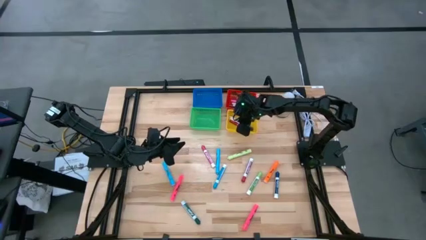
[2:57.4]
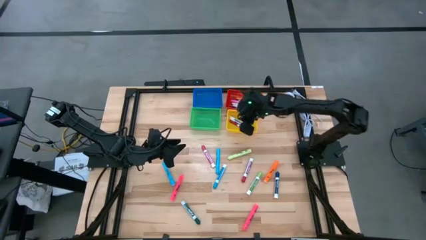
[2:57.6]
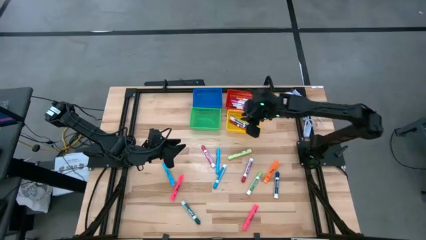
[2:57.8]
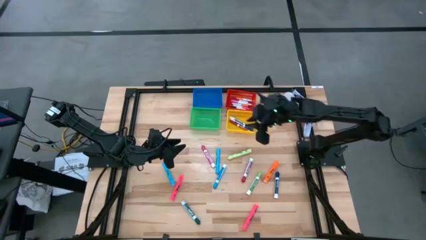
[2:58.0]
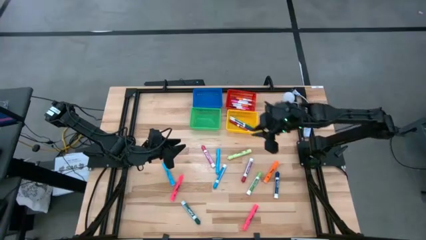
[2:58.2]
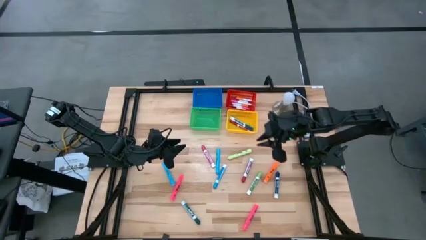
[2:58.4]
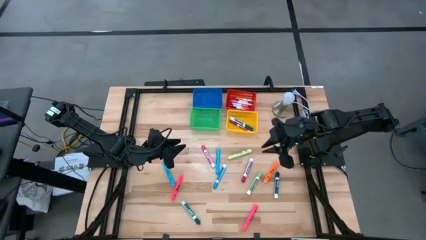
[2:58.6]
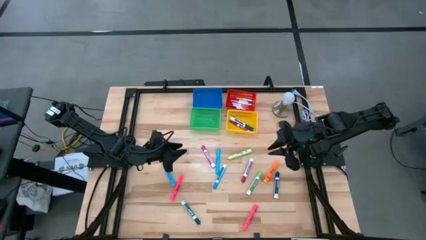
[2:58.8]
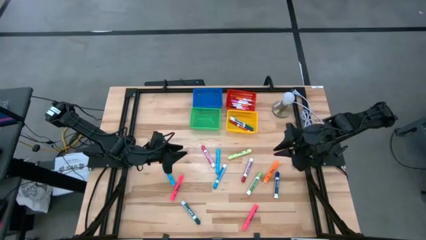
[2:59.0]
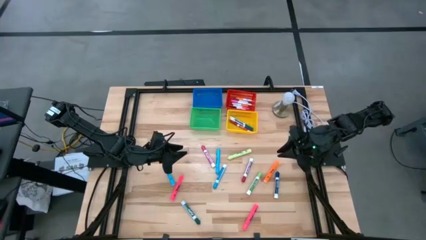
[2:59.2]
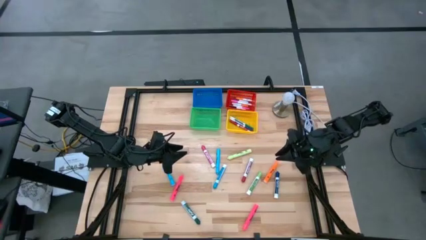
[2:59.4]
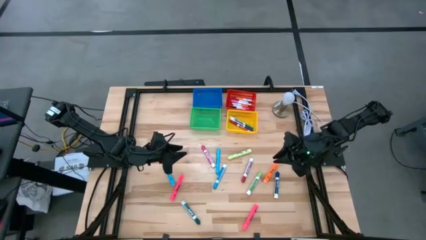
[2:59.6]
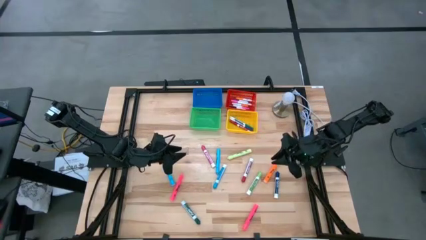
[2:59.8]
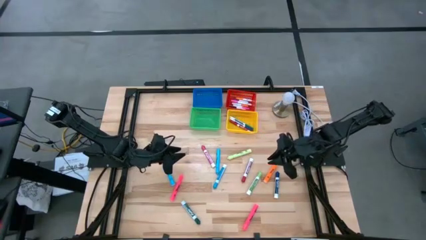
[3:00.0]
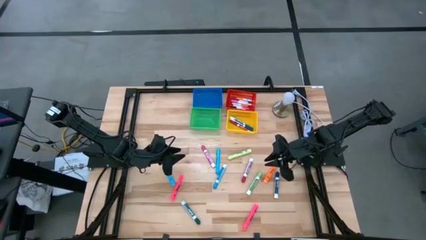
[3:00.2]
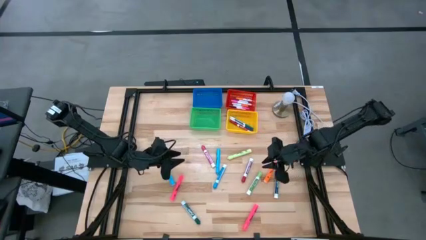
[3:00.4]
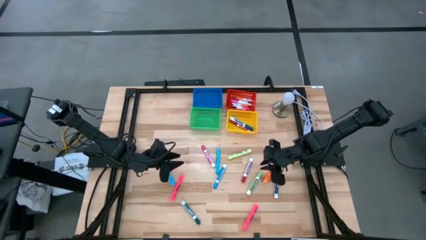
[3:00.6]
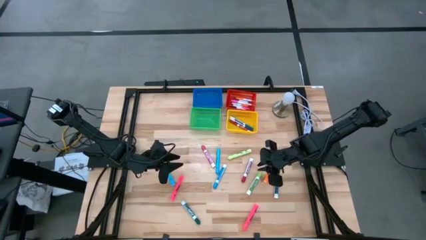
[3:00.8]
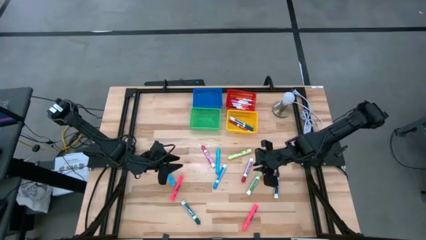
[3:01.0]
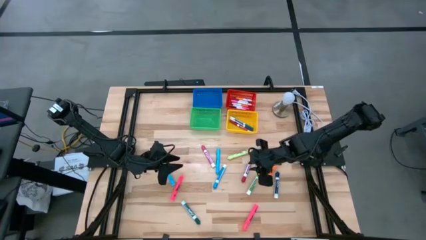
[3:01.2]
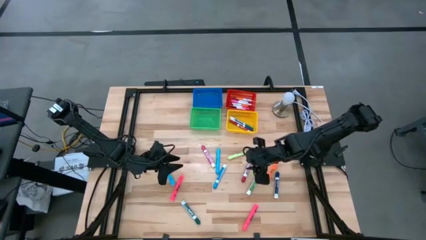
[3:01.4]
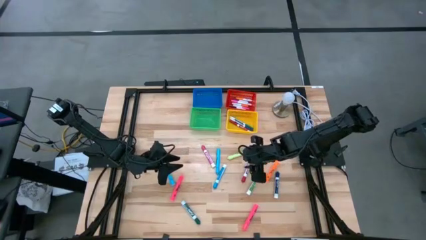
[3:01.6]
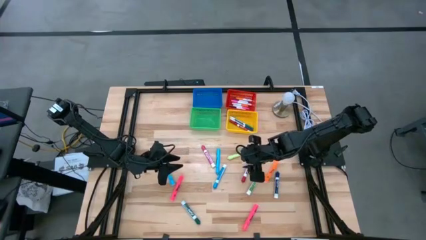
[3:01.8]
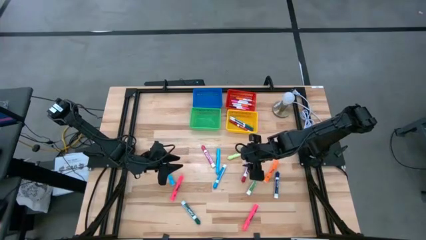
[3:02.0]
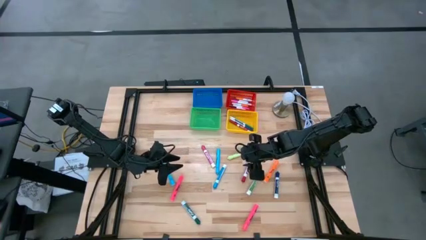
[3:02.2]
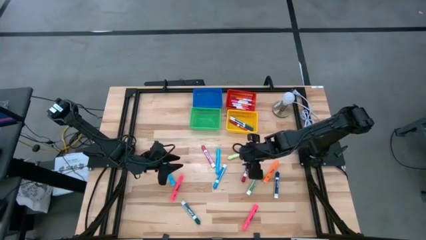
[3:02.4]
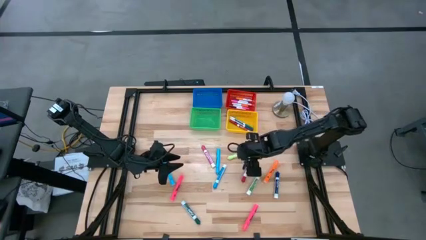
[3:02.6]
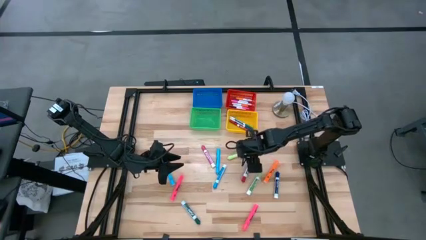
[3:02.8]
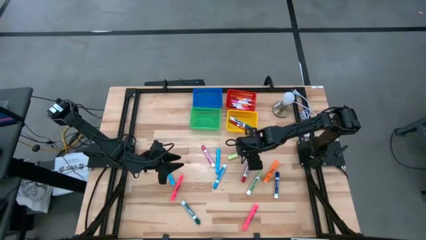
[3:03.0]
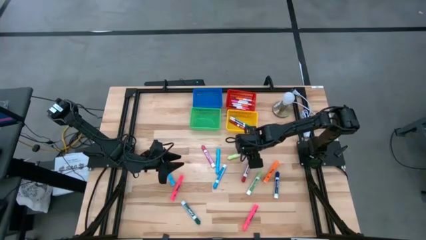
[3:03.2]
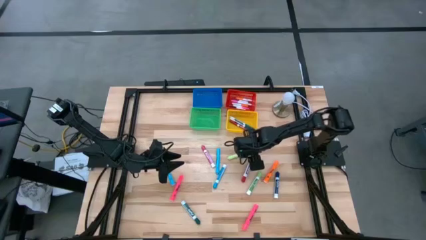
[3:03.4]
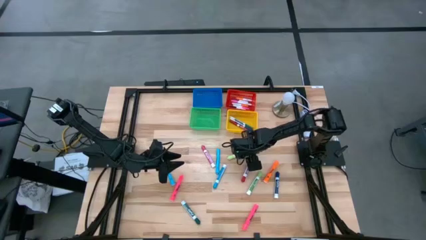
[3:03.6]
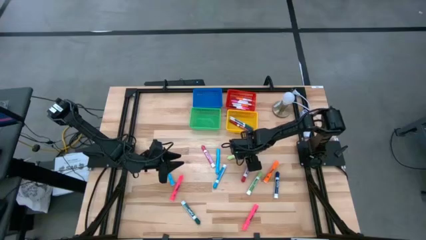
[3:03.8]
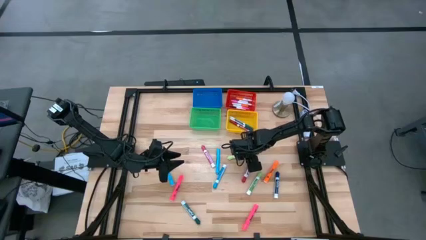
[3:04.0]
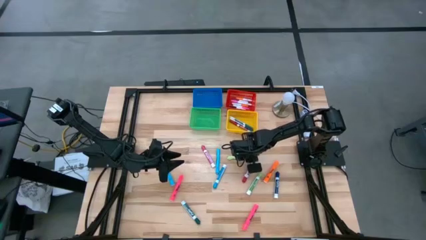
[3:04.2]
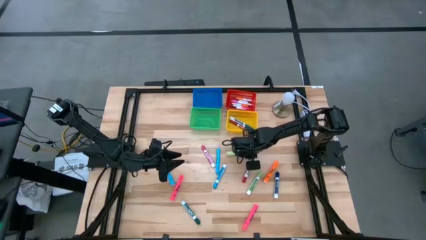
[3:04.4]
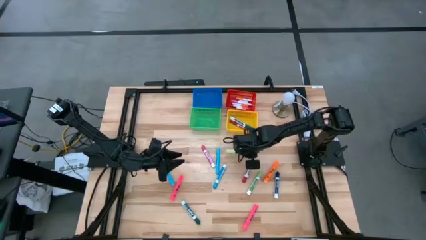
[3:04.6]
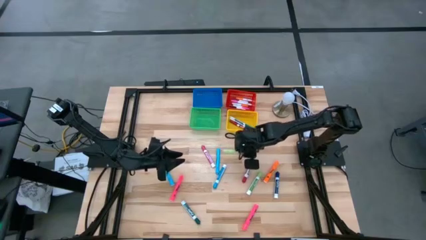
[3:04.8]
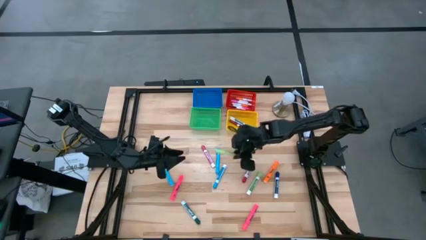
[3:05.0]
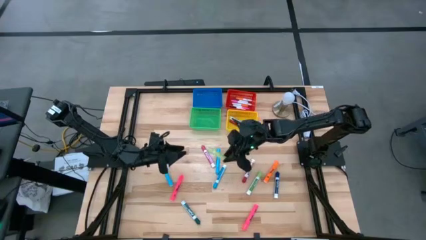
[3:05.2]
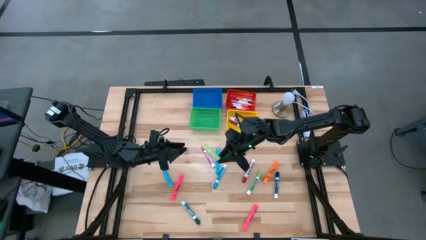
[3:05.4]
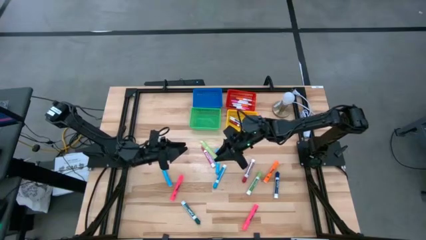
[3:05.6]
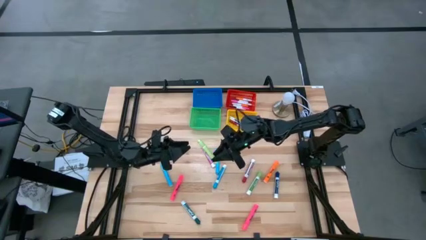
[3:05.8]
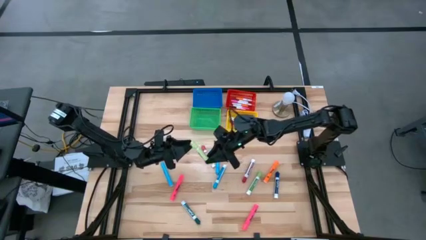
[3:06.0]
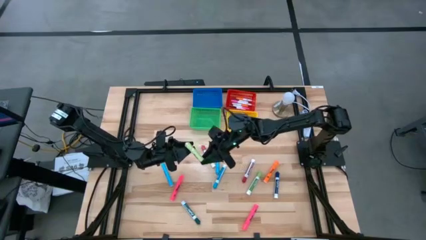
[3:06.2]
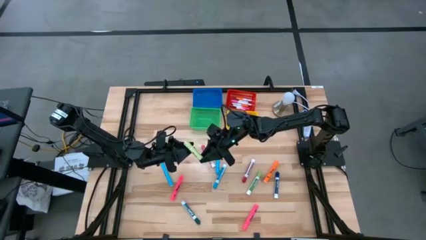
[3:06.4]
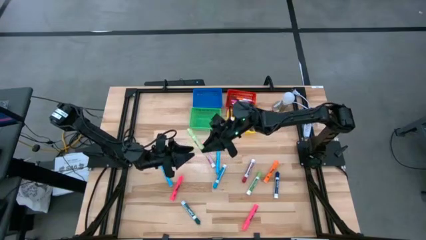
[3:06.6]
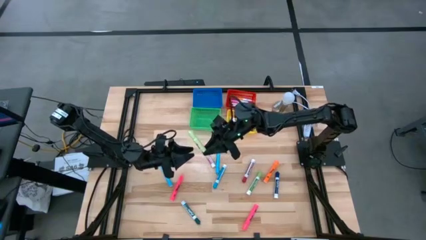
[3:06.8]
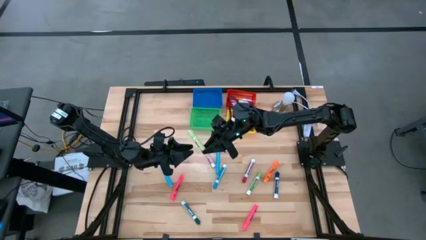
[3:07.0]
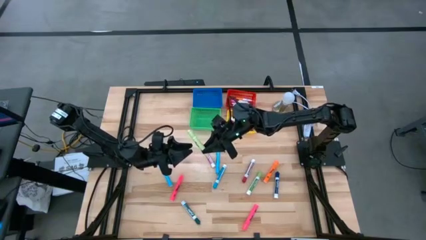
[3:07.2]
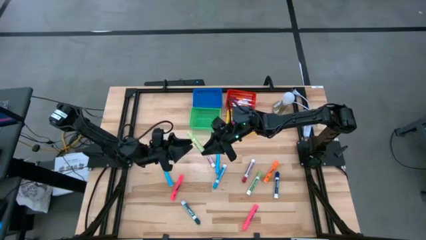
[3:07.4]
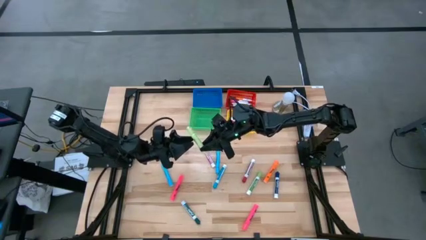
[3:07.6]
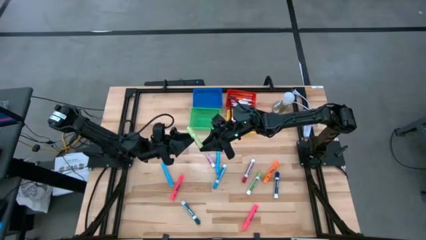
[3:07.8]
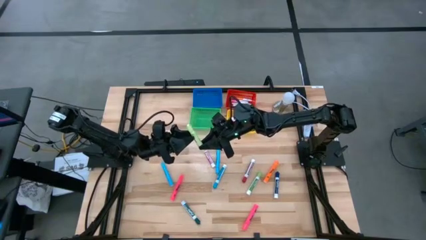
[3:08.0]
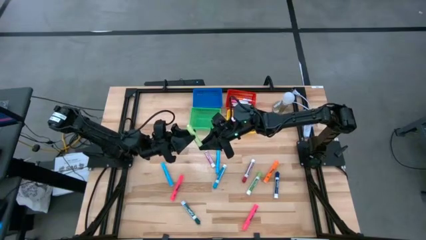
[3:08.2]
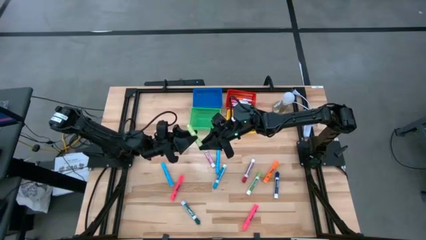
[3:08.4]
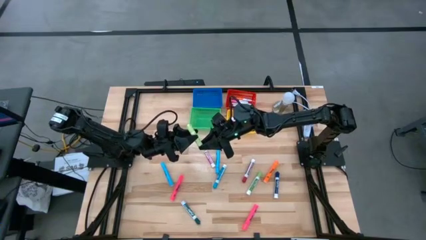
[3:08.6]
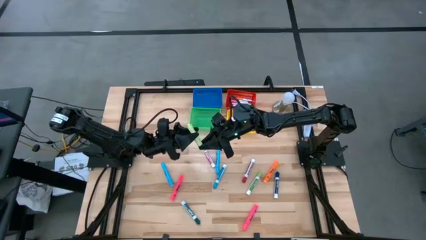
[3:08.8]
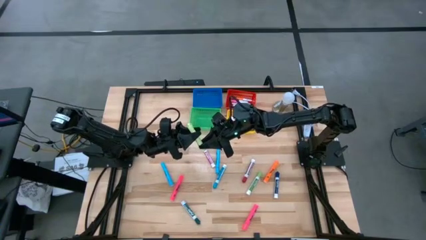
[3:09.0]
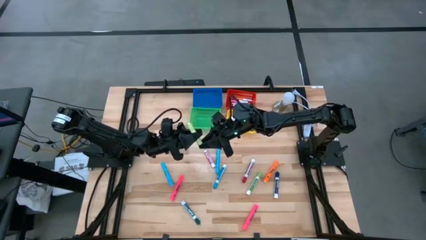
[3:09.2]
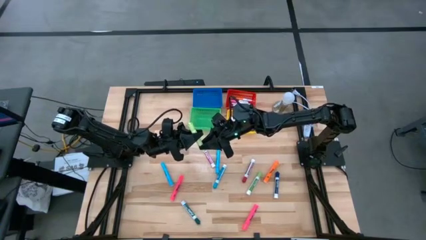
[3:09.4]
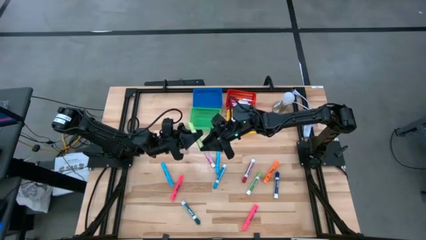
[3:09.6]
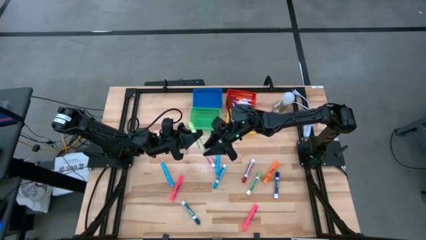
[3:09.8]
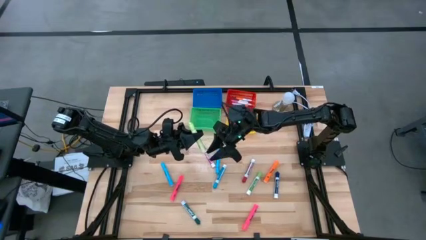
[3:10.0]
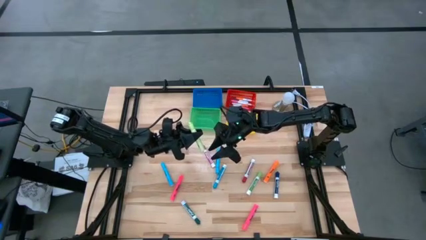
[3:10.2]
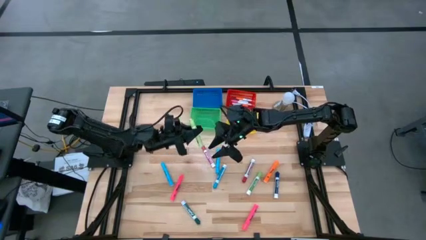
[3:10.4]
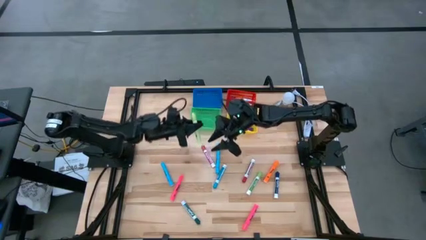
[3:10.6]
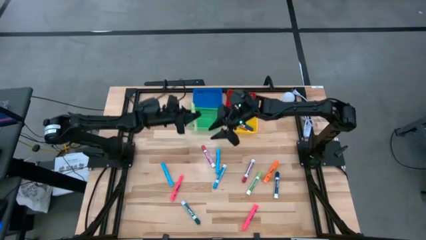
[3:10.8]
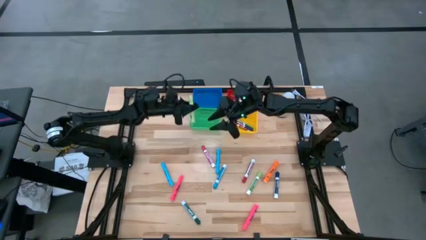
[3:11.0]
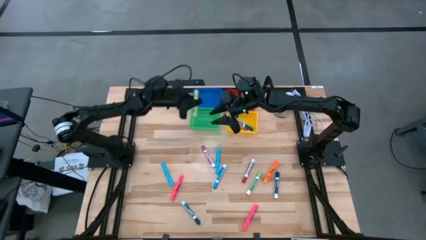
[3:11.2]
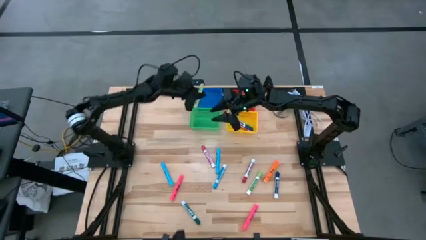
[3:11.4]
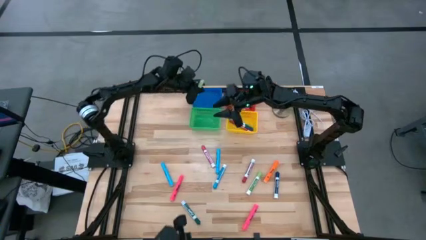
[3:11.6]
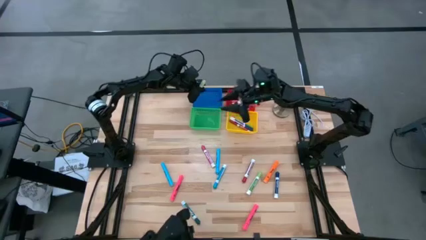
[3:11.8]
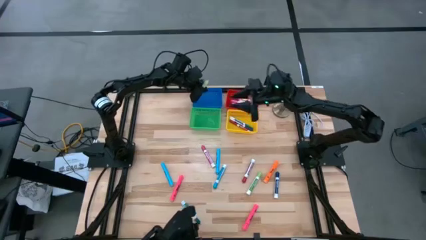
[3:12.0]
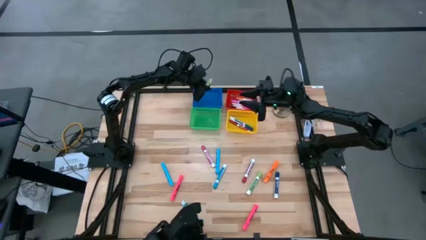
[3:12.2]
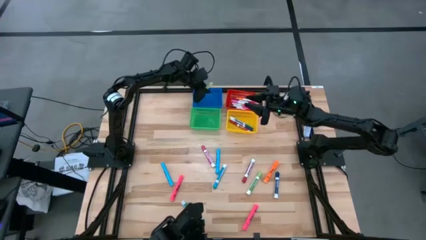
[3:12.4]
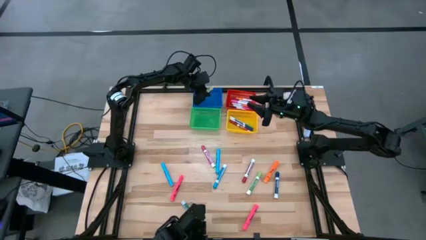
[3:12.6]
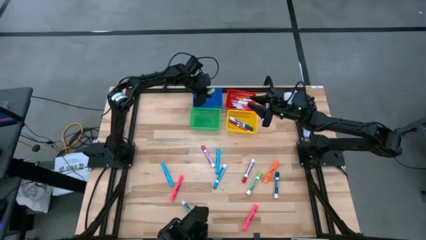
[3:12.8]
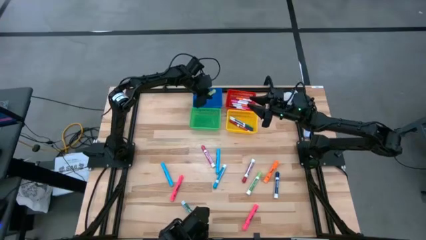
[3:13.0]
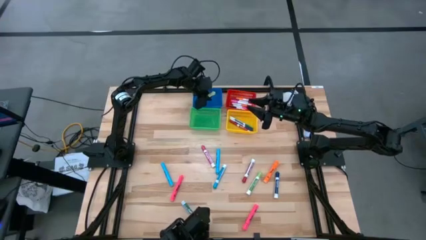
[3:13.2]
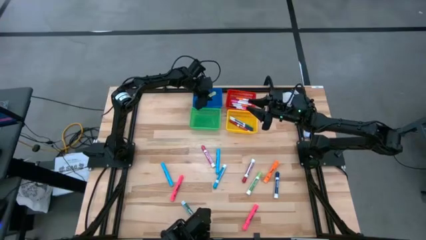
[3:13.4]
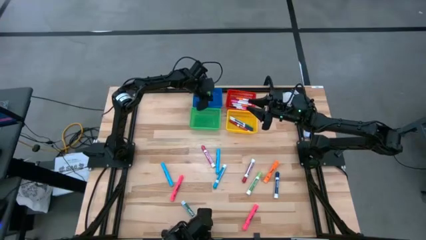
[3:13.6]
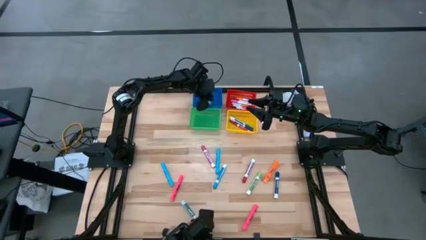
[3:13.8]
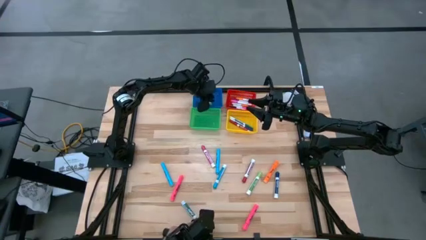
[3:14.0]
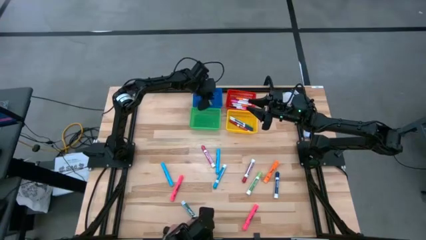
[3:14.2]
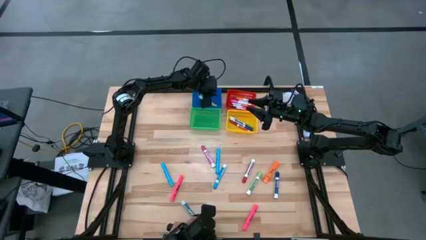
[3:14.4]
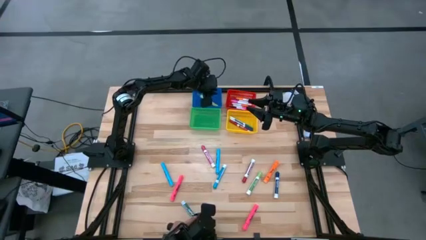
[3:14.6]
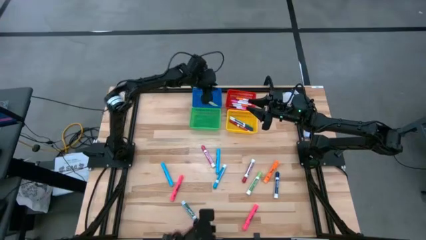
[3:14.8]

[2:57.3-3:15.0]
Task: Pick & Place Markers
Put the green highlighter into the blue basket
